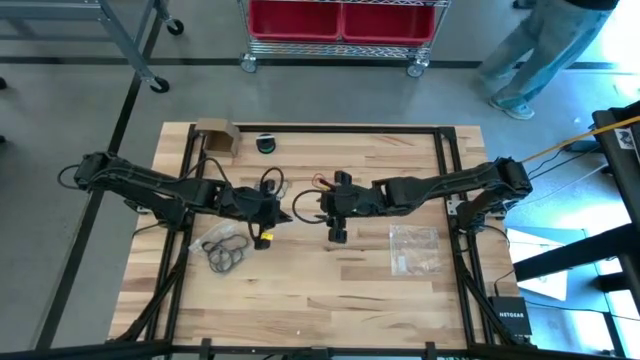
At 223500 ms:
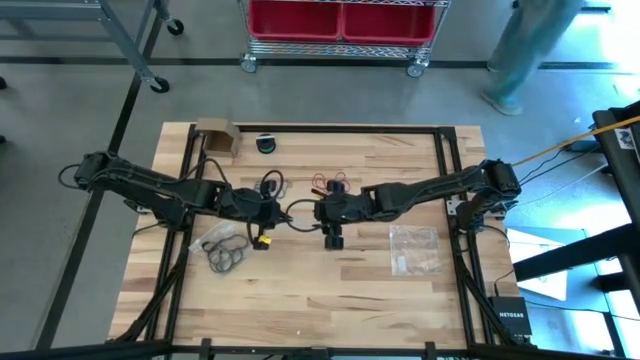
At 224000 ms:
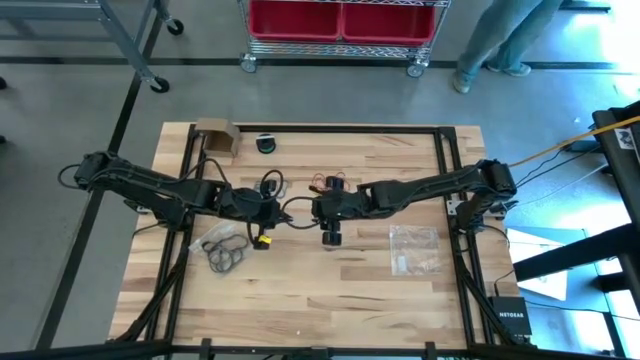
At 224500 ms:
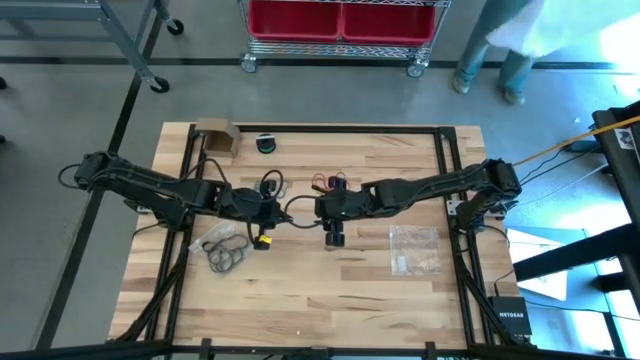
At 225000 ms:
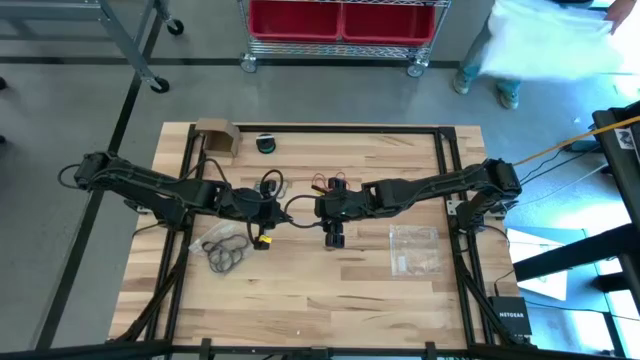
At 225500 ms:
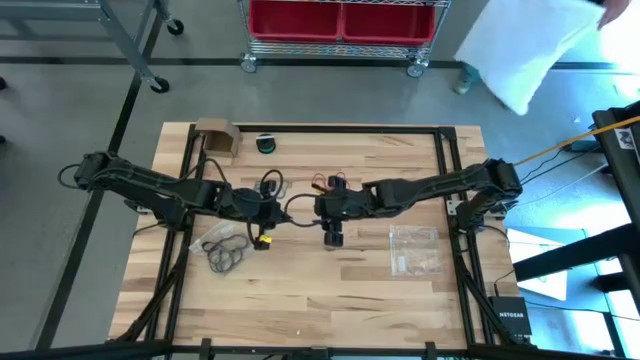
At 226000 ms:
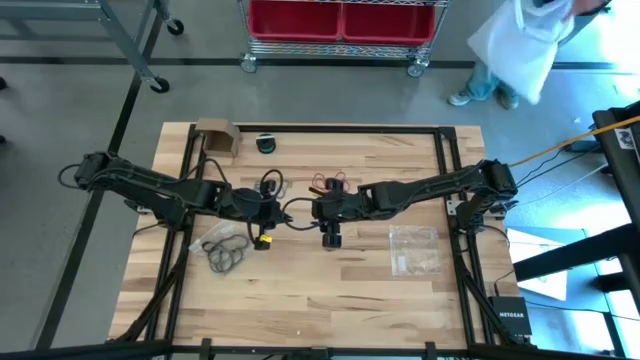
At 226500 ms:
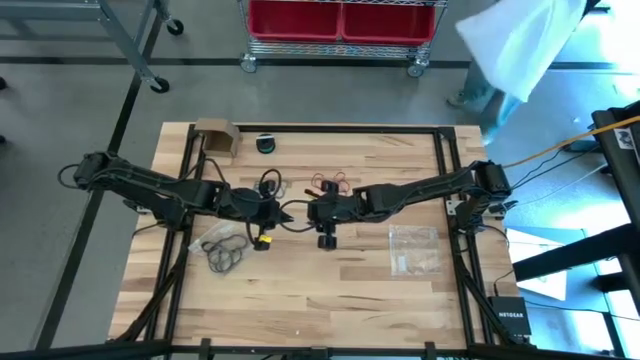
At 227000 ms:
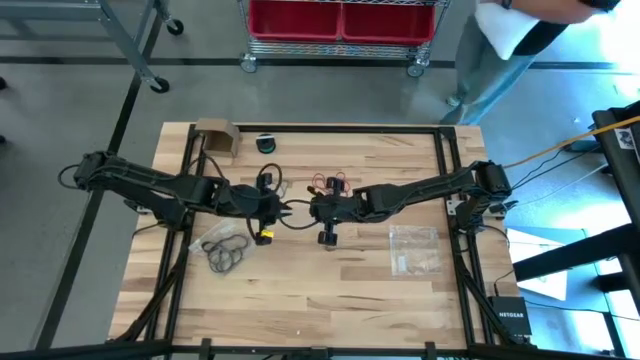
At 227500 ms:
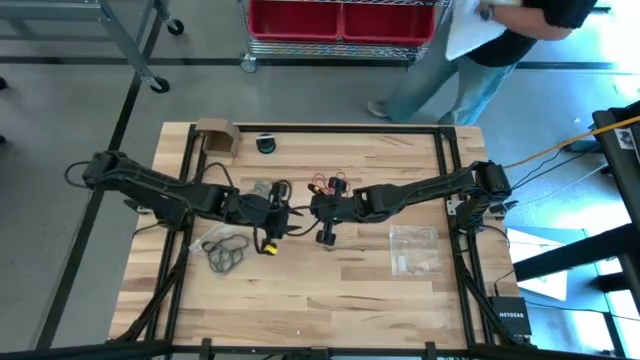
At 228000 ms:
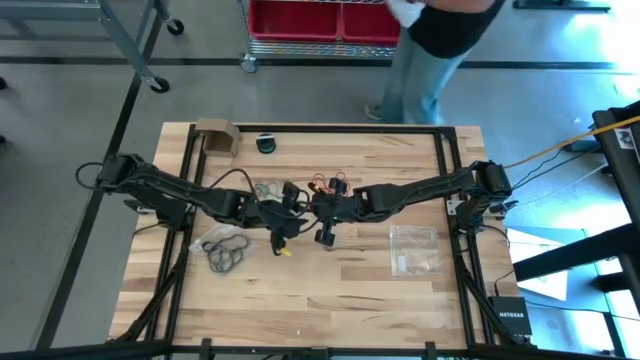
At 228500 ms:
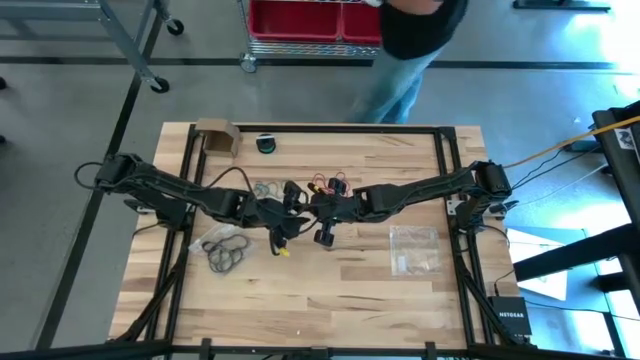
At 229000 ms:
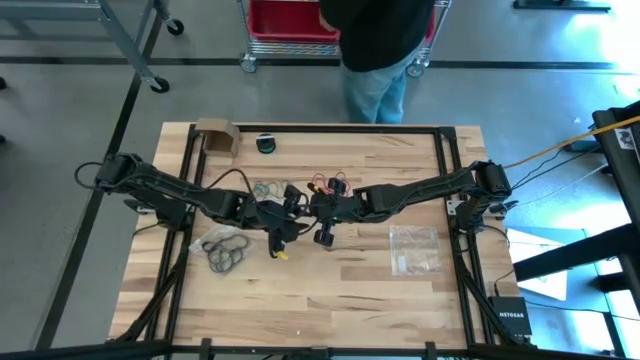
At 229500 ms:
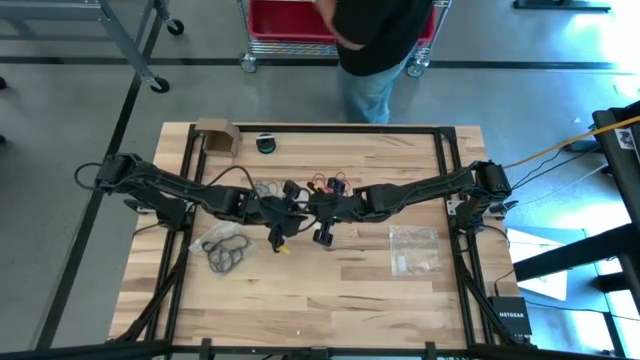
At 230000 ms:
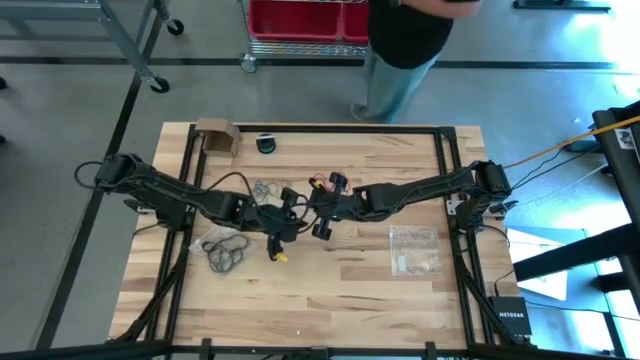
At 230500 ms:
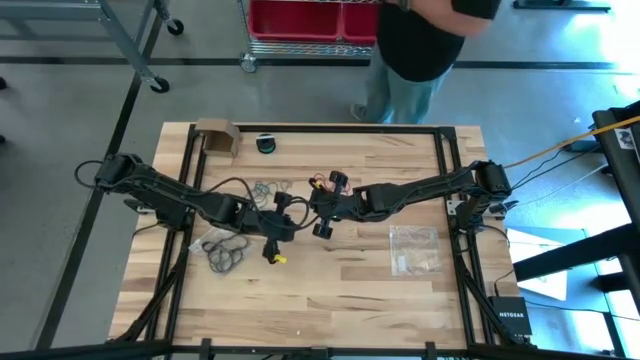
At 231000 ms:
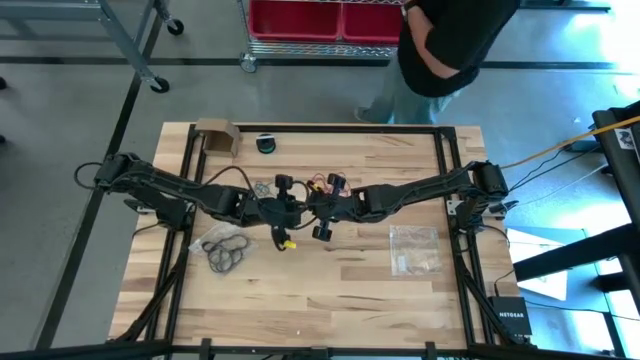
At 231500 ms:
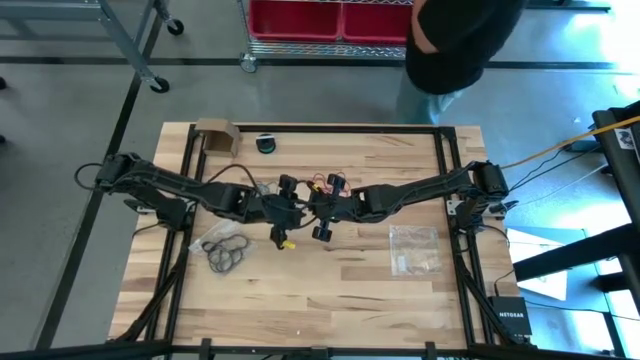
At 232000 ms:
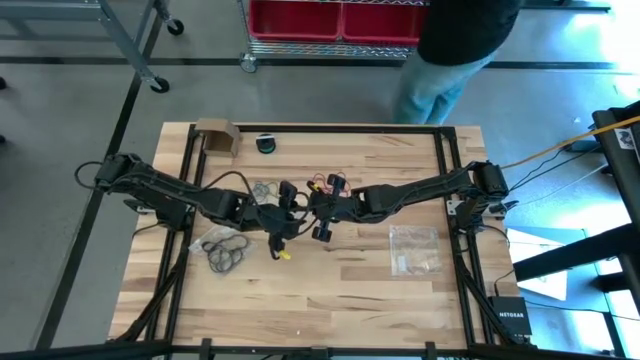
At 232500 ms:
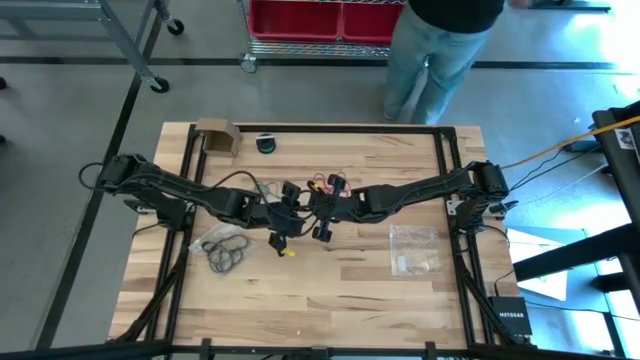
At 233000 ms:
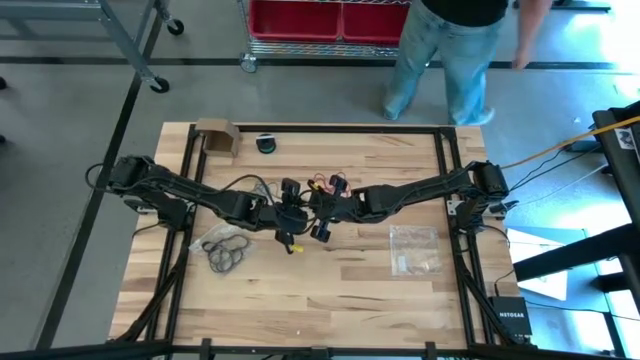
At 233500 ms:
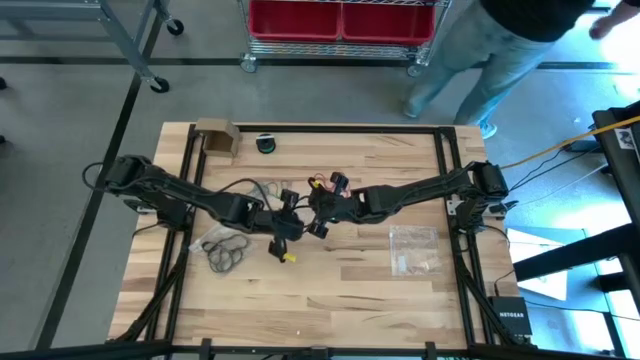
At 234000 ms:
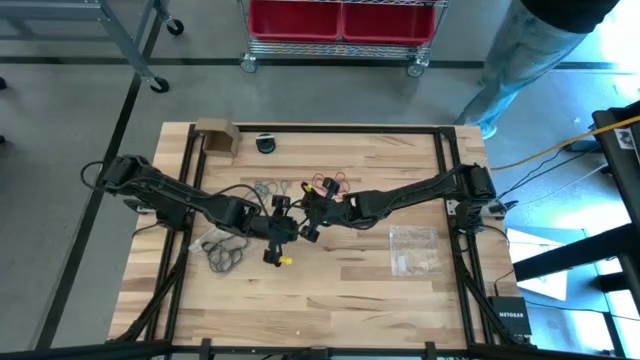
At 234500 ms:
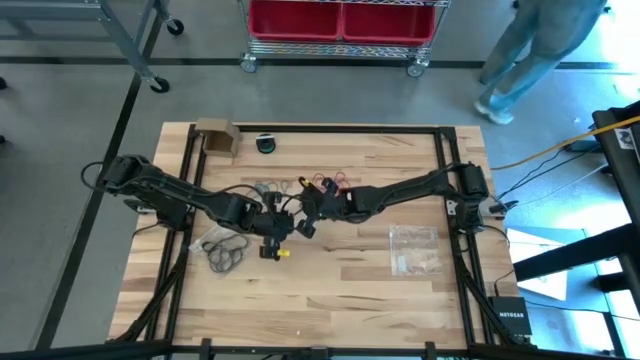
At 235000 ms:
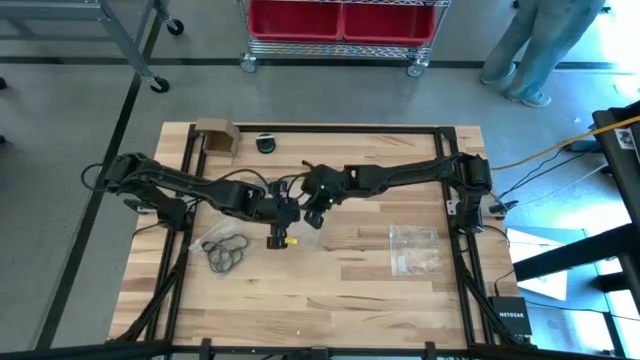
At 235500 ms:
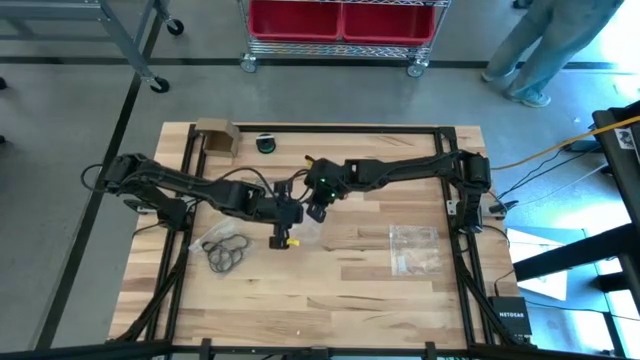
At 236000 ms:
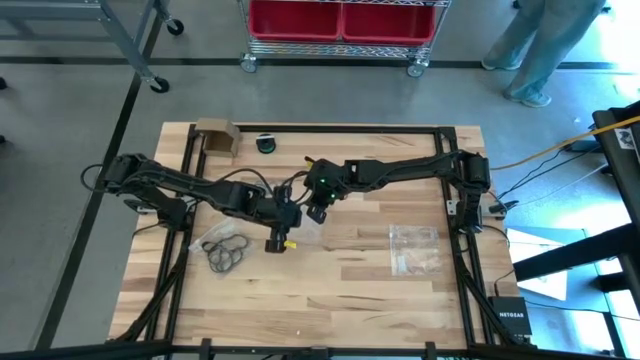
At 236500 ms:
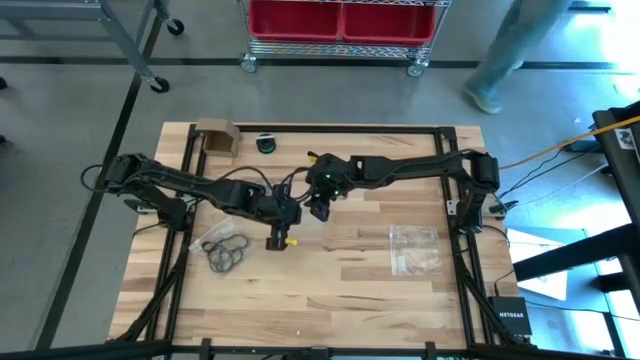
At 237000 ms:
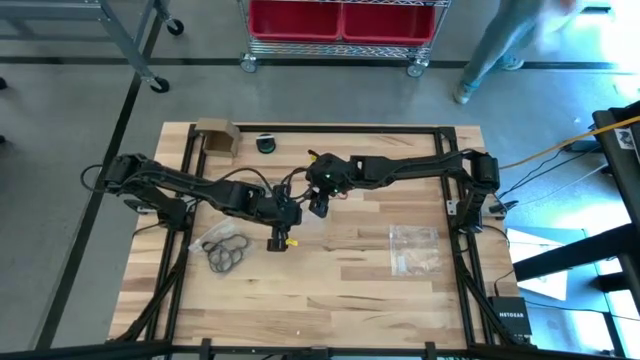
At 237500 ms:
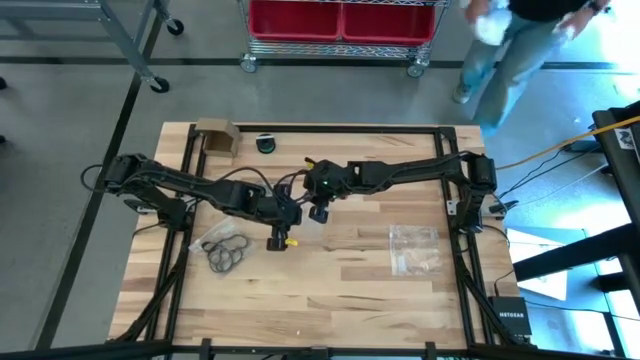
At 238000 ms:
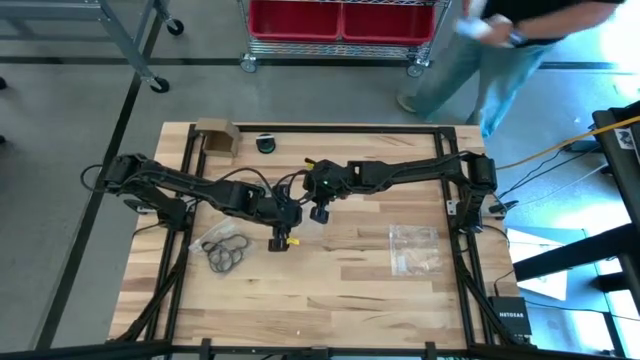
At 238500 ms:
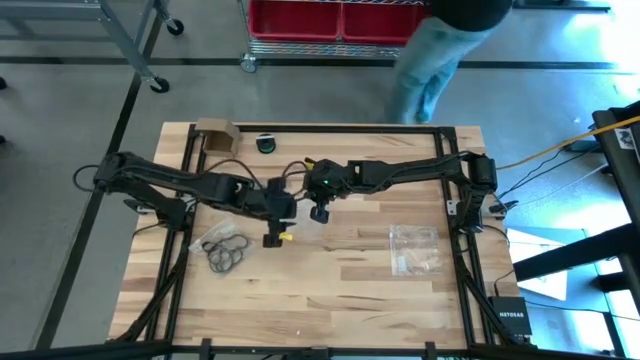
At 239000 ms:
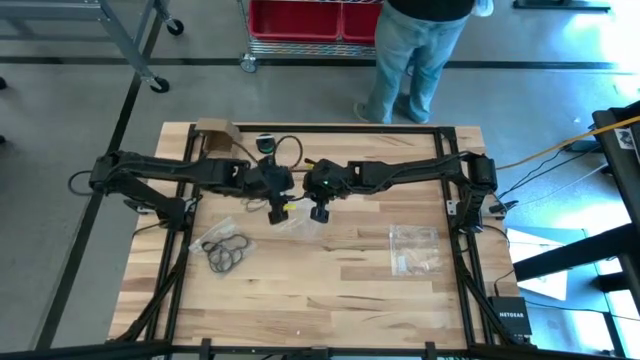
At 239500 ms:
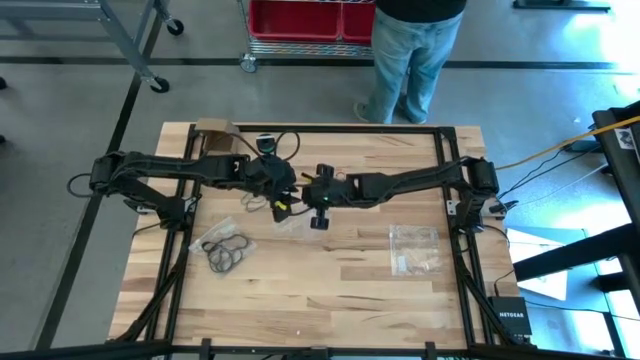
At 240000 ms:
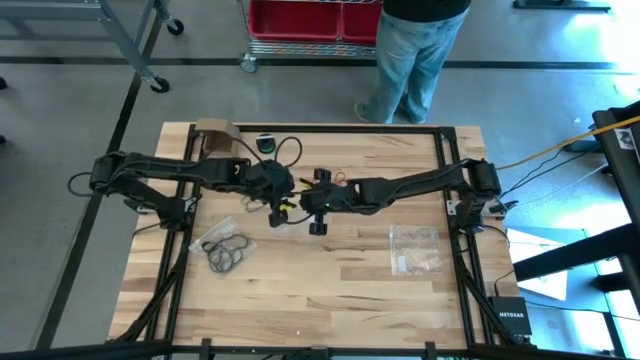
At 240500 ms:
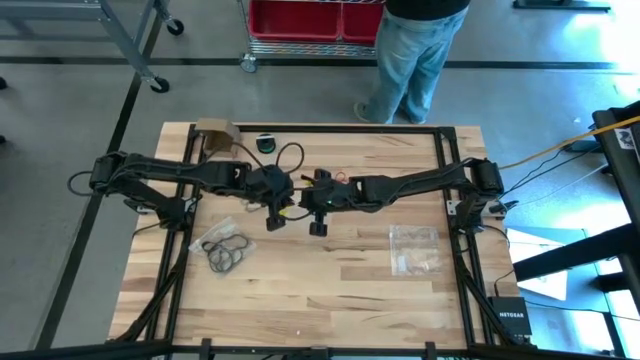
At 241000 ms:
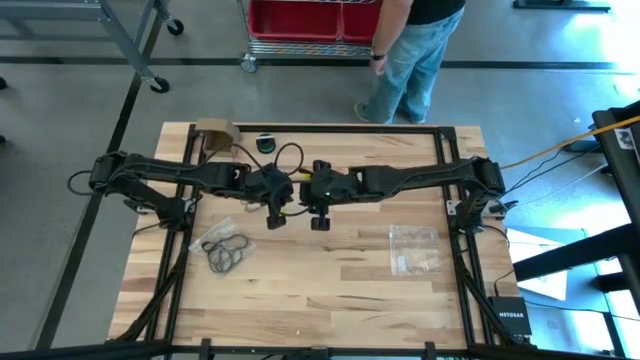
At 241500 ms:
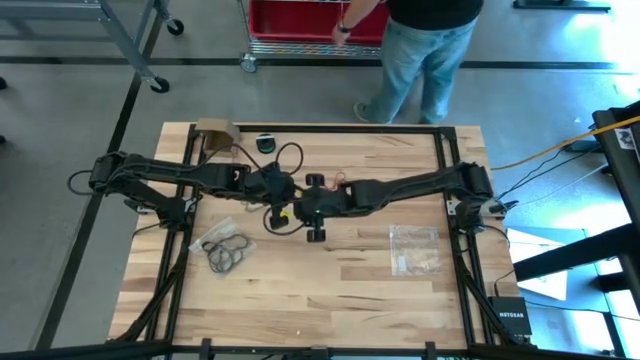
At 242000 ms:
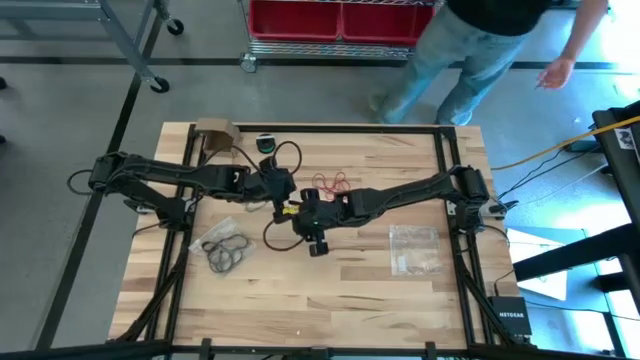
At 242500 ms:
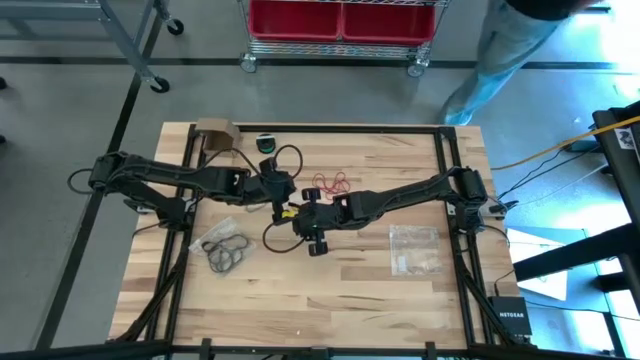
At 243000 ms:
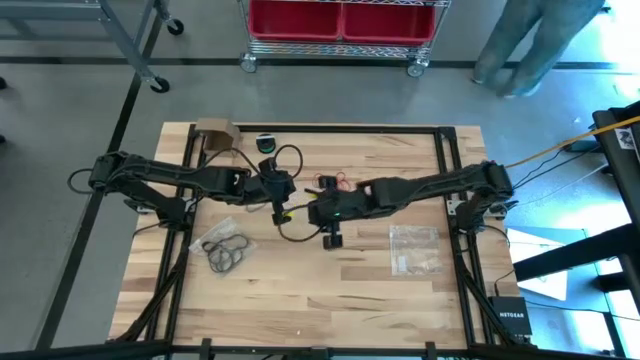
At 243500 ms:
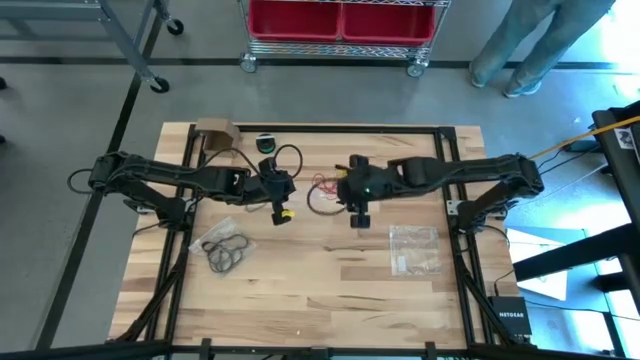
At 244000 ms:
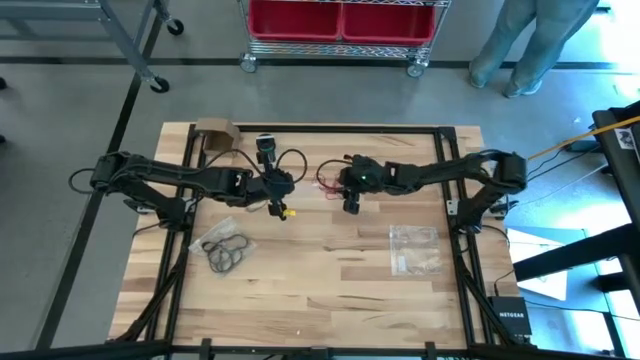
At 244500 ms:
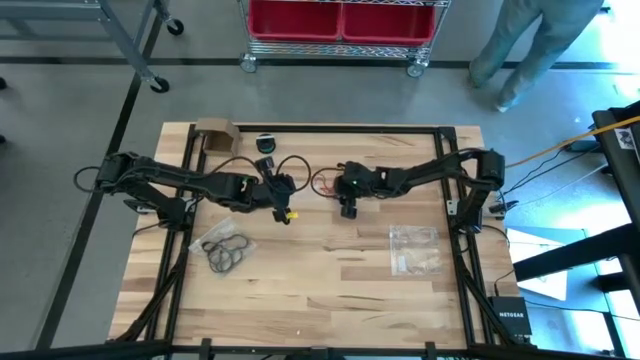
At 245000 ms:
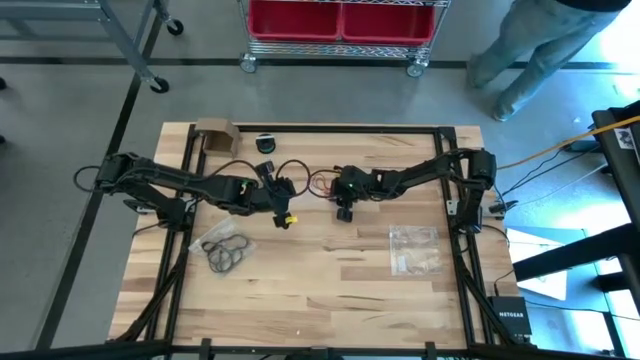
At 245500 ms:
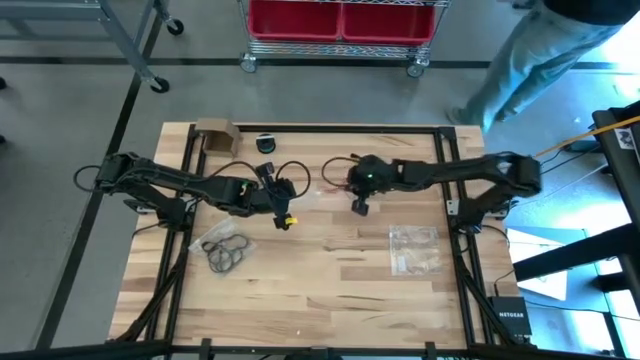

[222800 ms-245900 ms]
Task: Sort rubber bands
Put the red rubber band into the transparent zip bag

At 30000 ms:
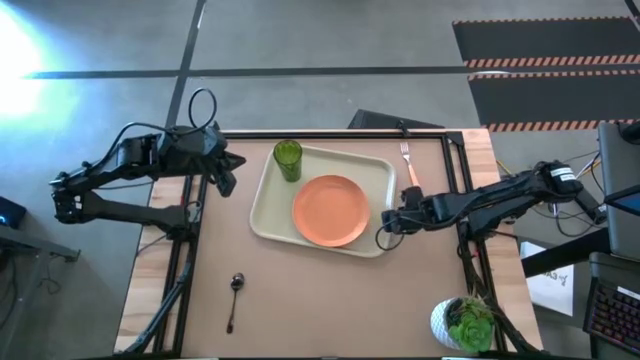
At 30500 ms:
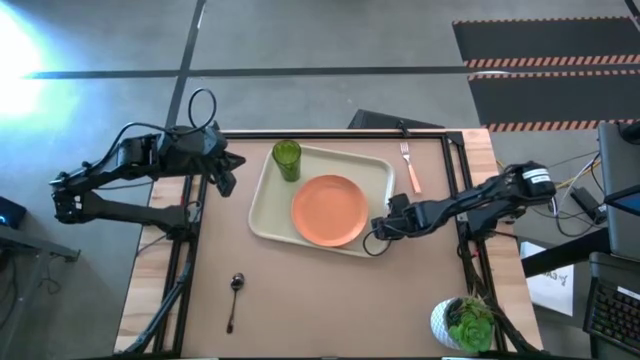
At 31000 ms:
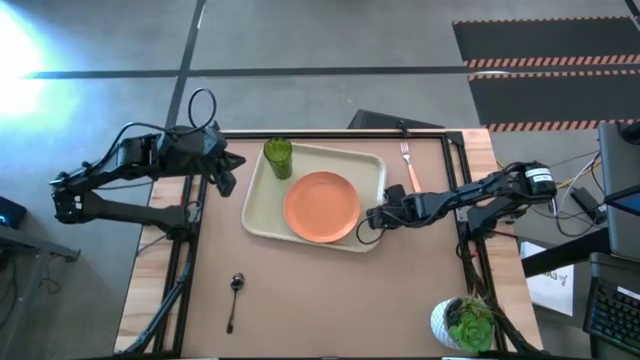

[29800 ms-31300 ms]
Task: Pick and place plate/cup/fork/spoon on tray
Adjust the light brown serving tray
